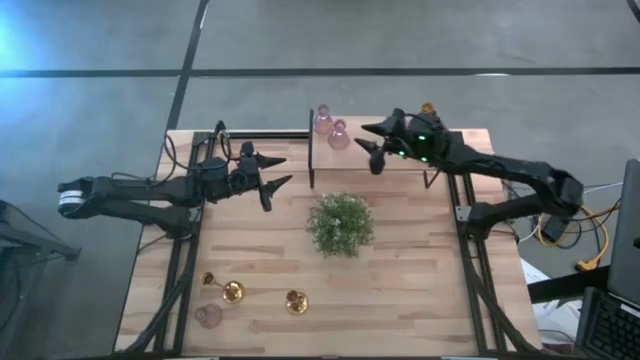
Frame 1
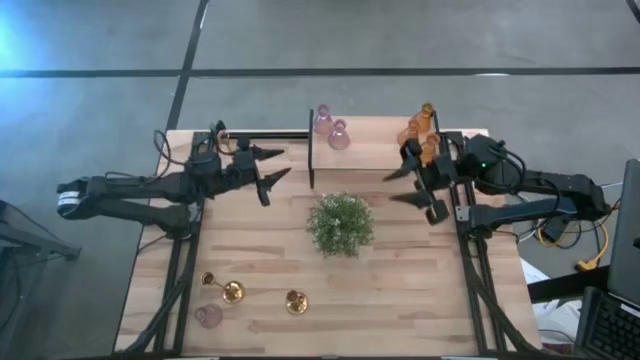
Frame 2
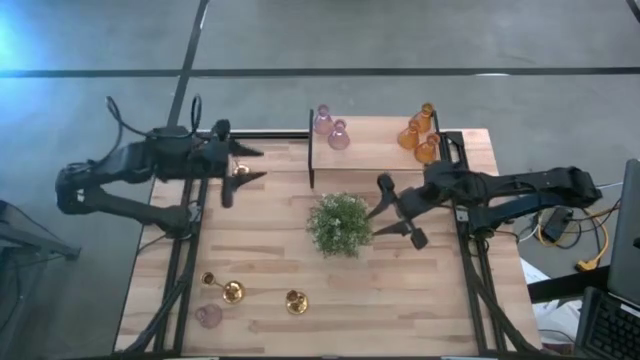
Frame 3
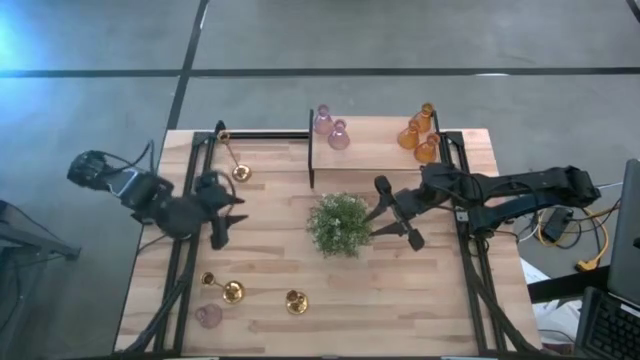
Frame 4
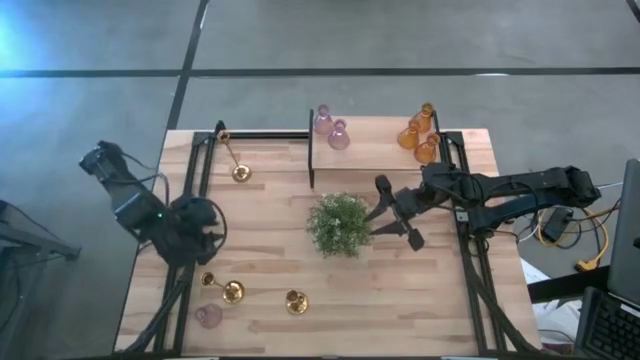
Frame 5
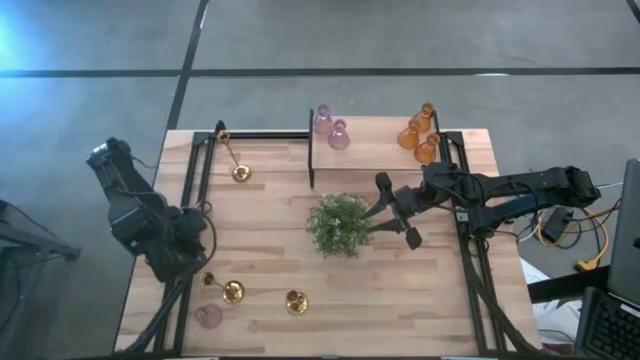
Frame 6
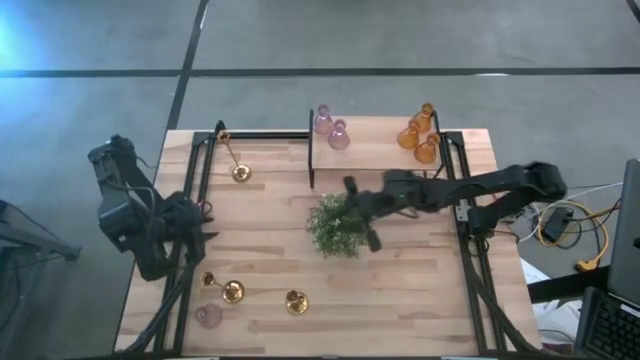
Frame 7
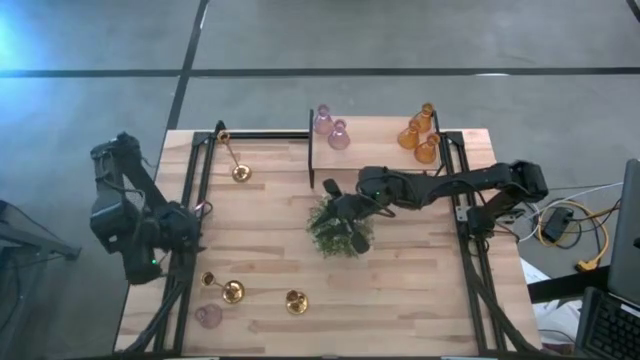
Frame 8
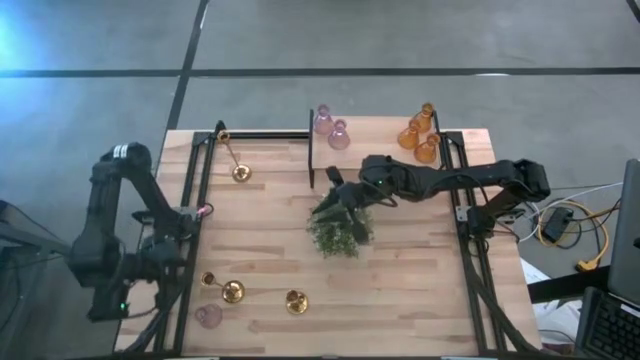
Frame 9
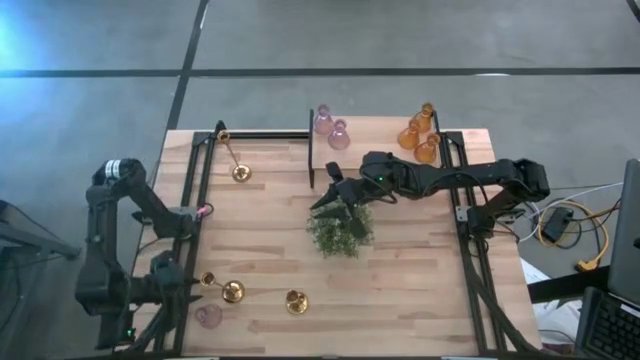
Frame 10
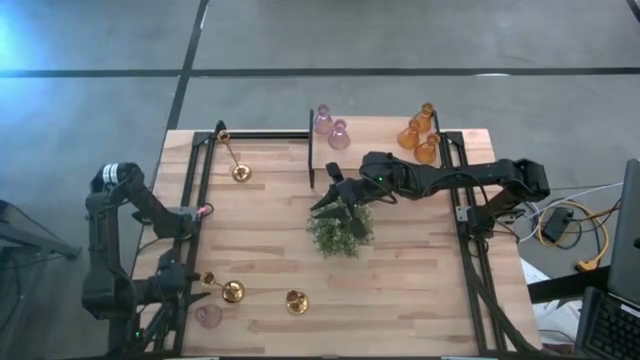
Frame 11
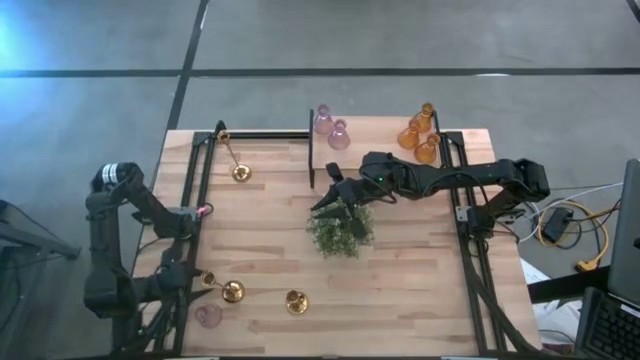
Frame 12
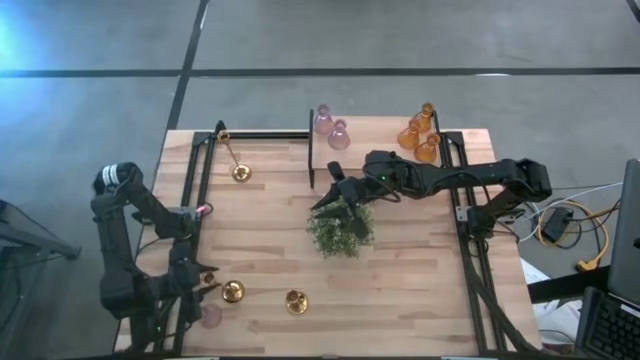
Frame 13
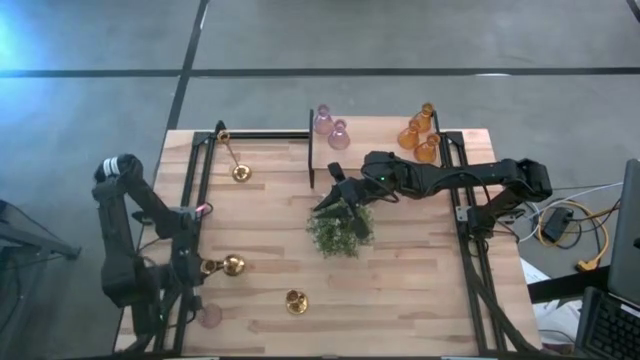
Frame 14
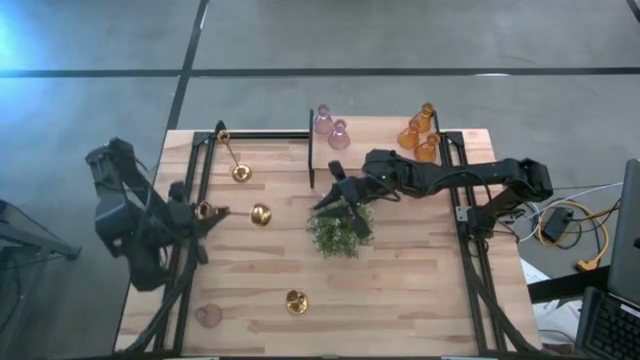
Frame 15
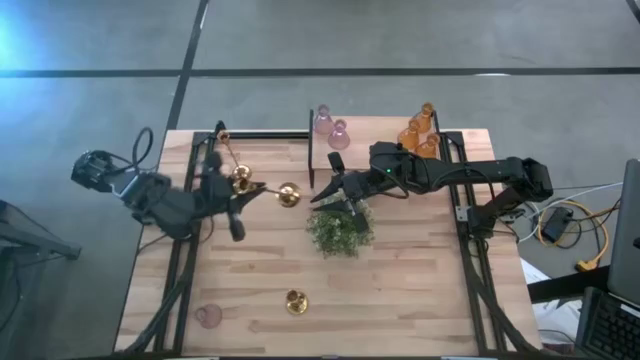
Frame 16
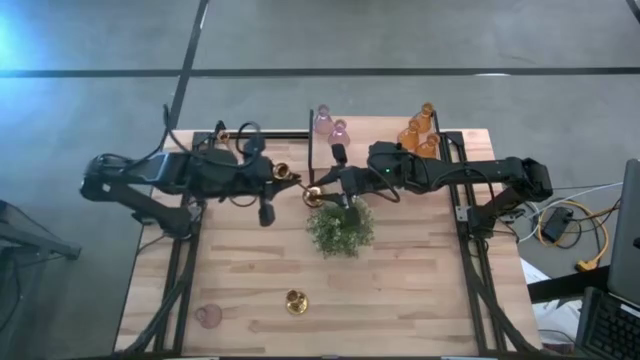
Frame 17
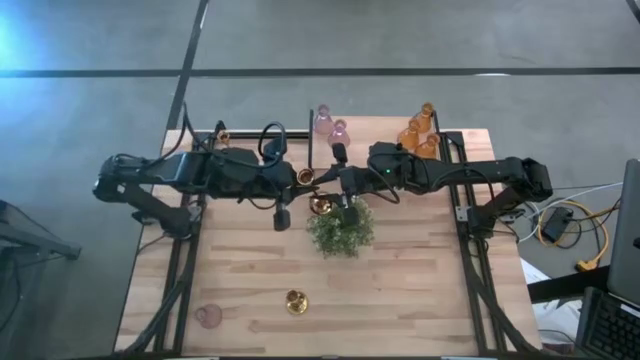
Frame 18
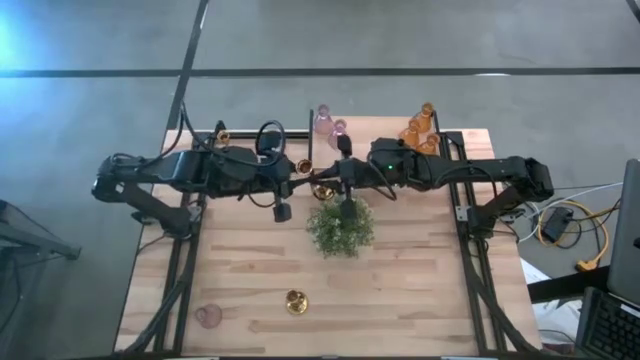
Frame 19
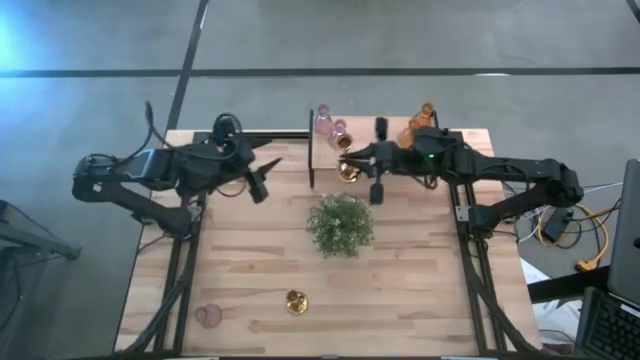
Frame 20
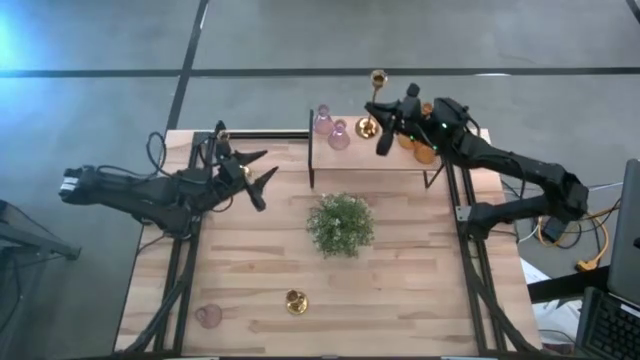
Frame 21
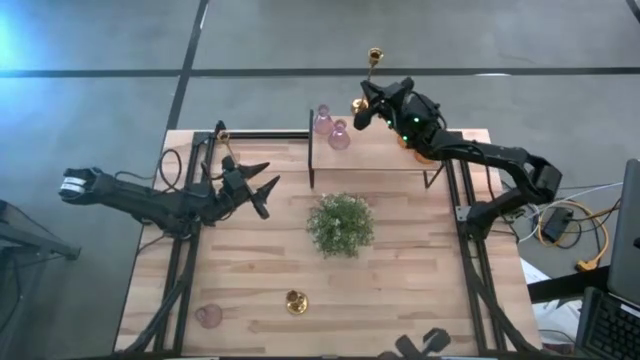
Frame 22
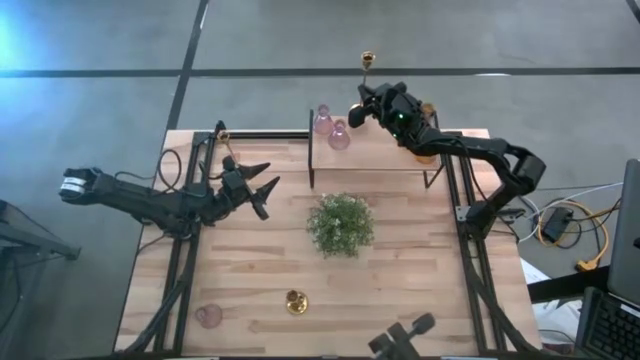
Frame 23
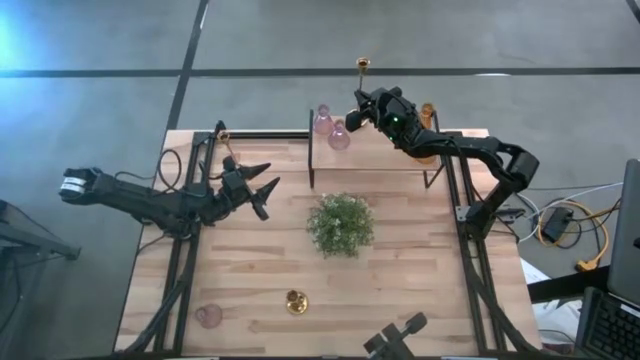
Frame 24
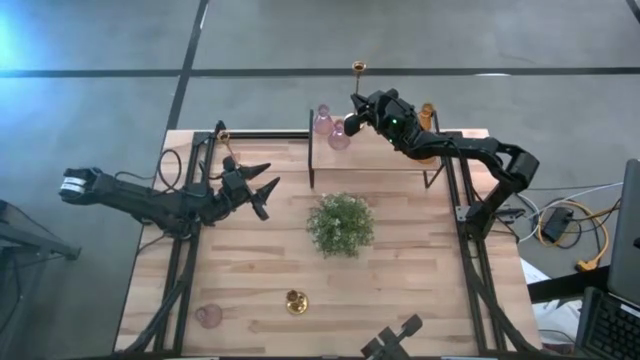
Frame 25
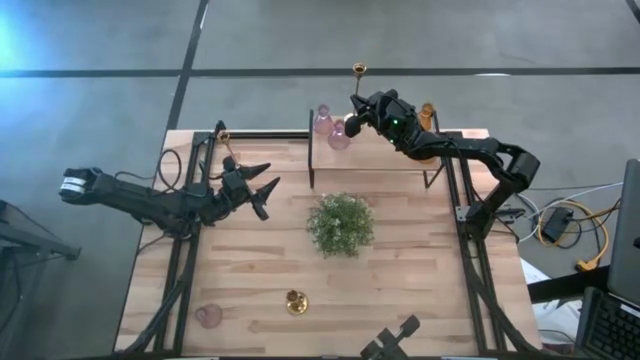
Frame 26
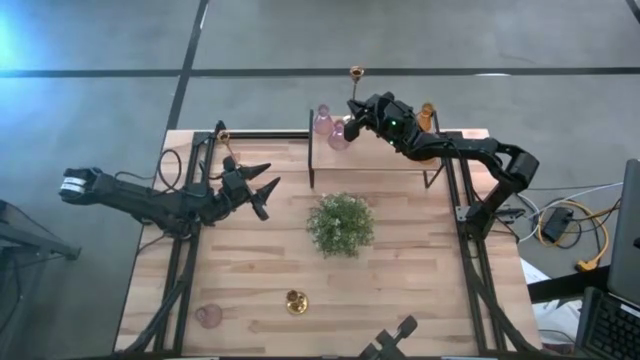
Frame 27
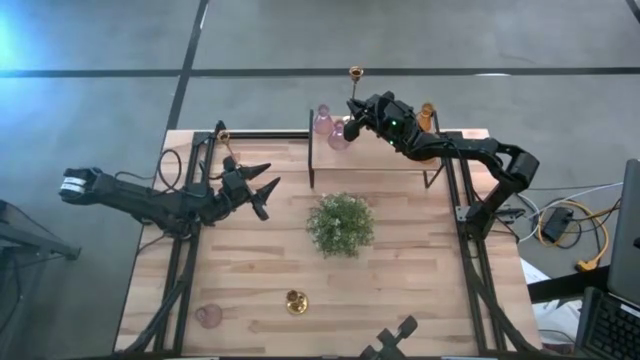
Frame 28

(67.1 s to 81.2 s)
Task: Pick & Place candle stick holders
Put the large bottom left golden candle holder on the shelf

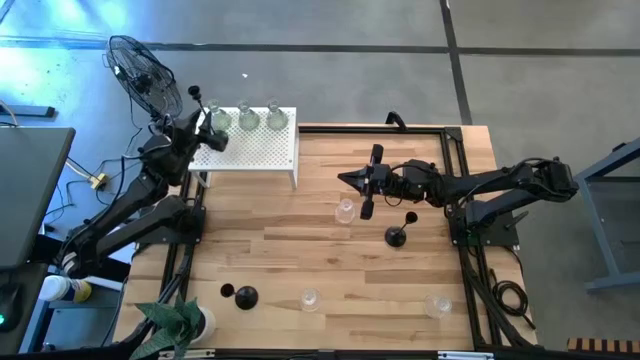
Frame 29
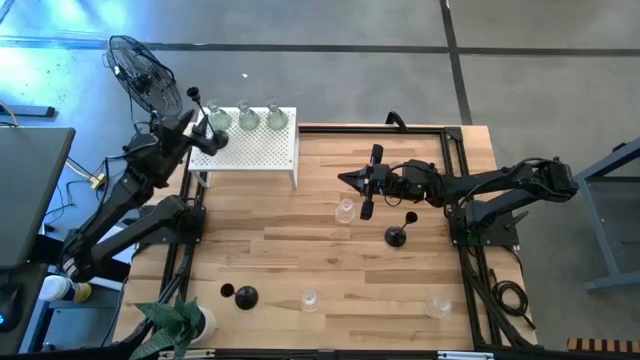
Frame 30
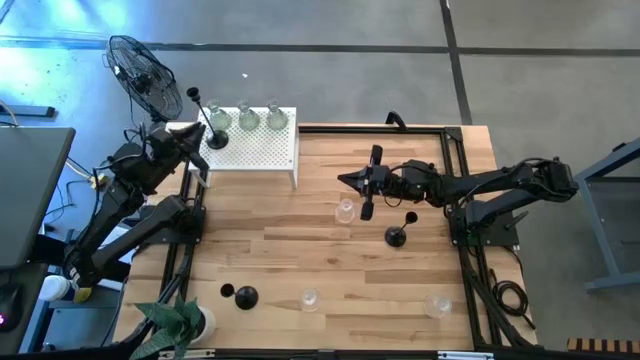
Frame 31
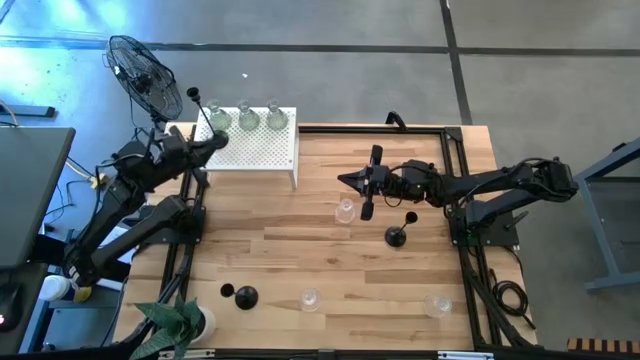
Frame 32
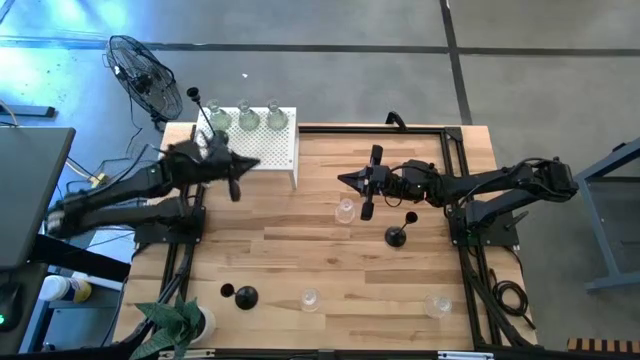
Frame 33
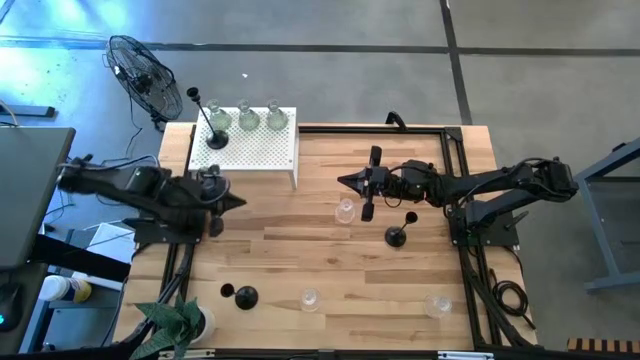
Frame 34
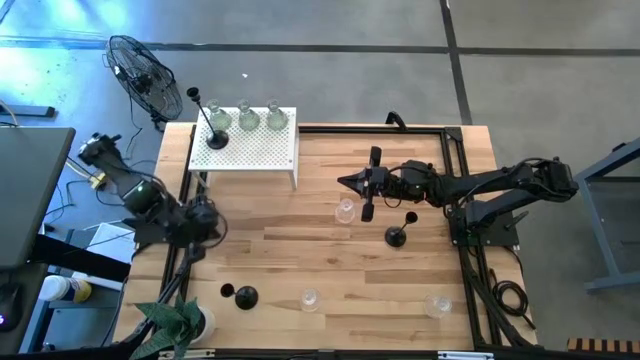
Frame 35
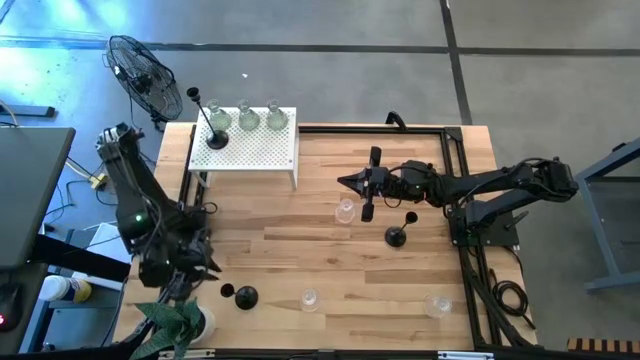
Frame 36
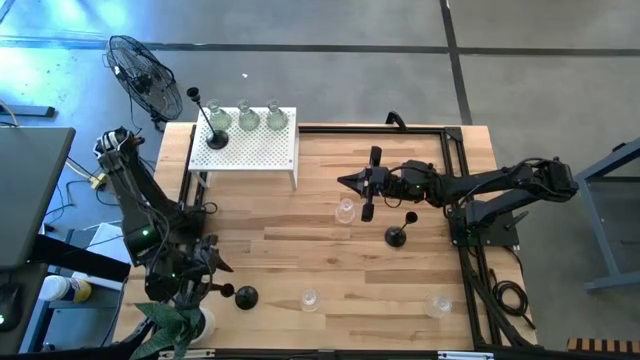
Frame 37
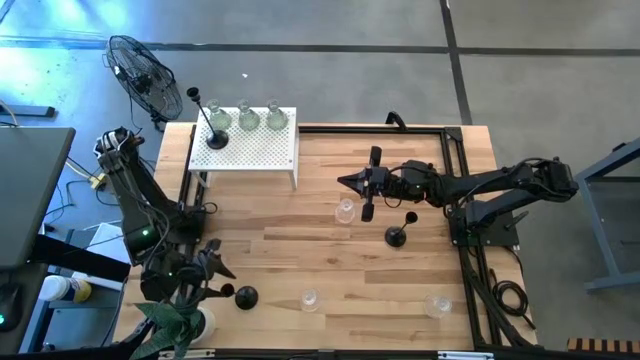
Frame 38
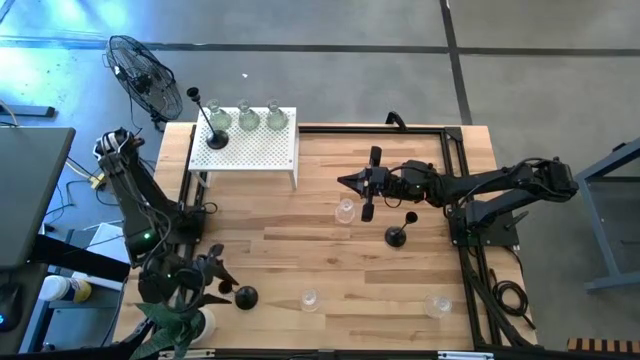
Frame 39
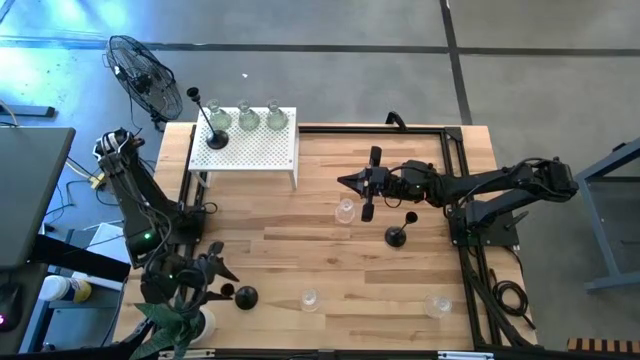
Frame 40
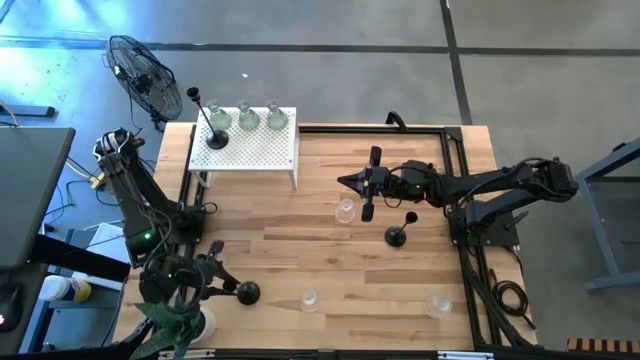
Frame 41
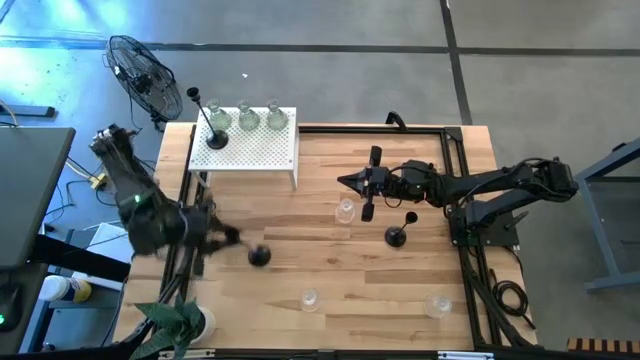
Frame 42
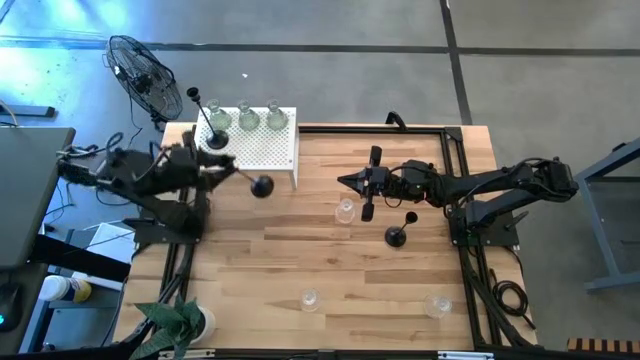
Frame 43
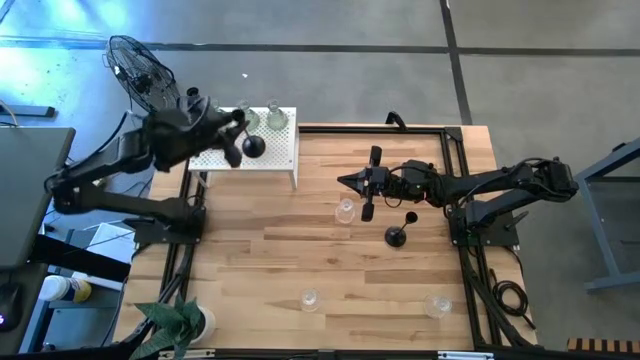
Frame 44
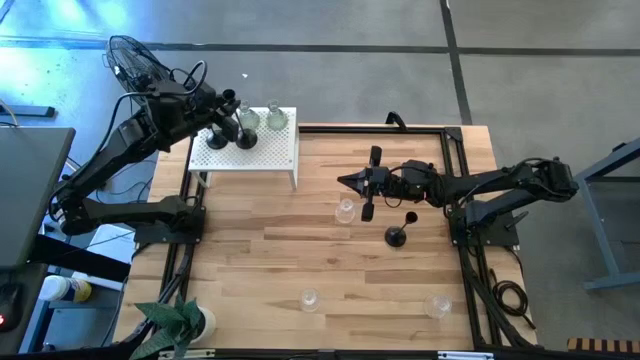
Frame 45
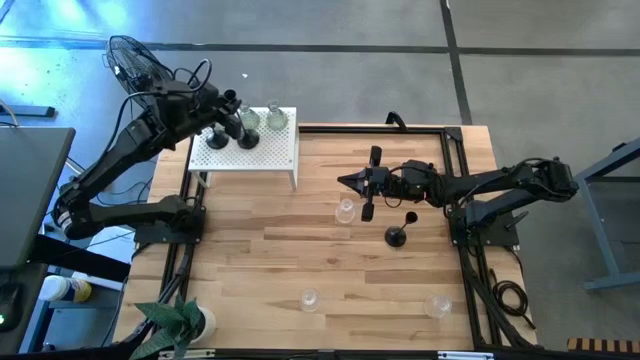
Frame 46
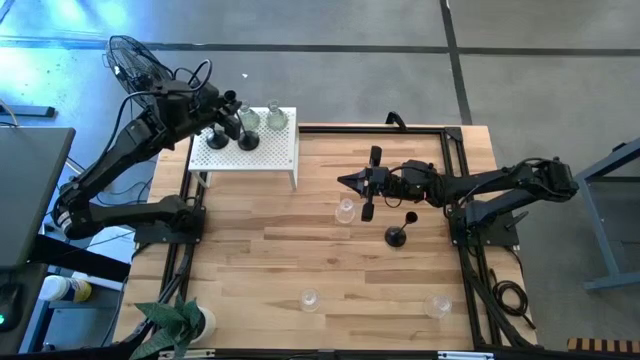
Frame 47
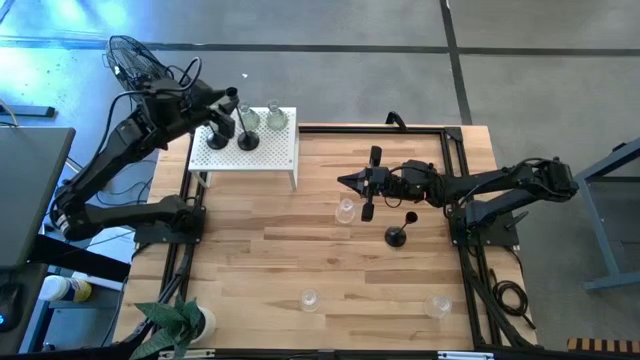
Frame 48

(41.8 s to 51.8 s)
Task: Pick & Place candle stick holders
Put the bottom black candle holder on the shelf aligned with the other black candle holder
